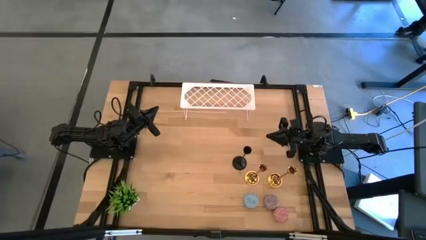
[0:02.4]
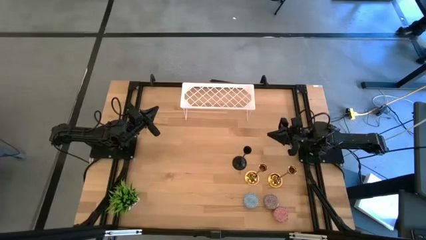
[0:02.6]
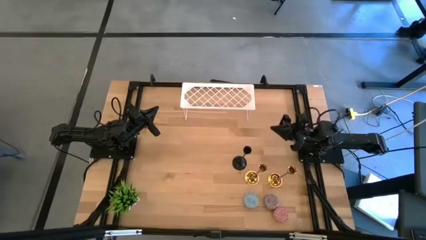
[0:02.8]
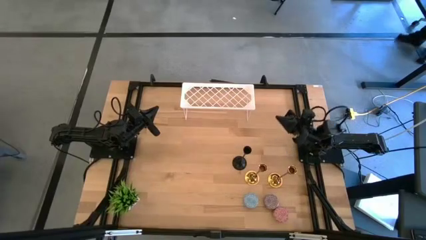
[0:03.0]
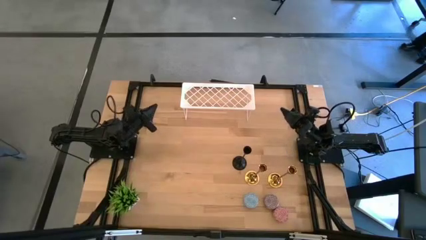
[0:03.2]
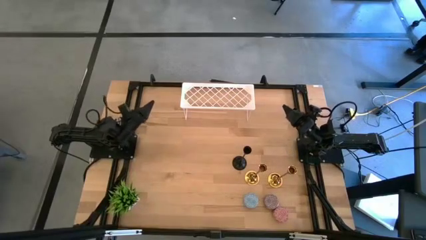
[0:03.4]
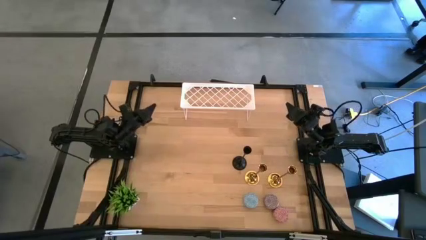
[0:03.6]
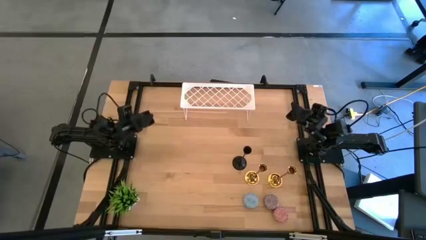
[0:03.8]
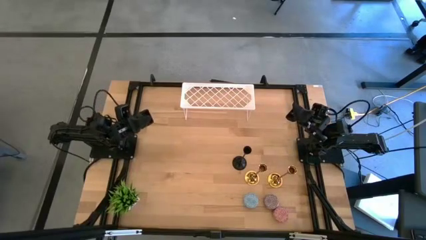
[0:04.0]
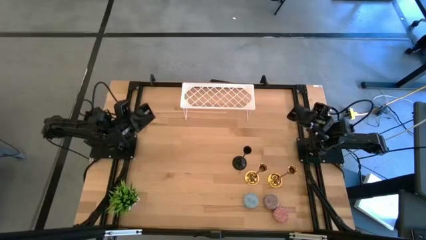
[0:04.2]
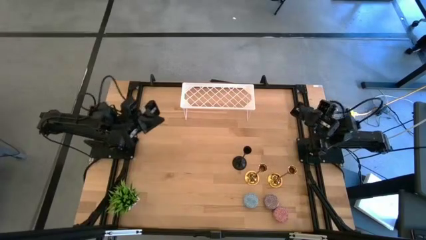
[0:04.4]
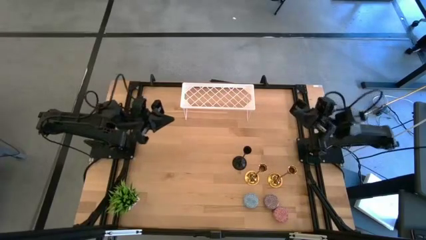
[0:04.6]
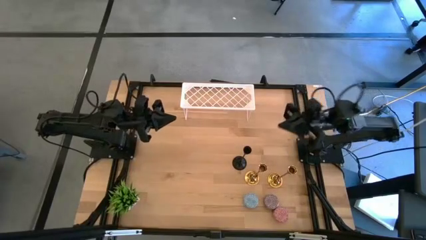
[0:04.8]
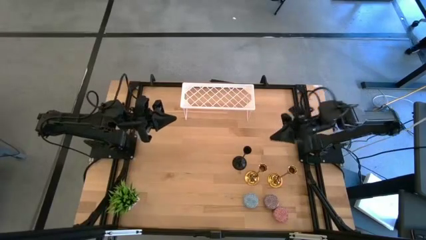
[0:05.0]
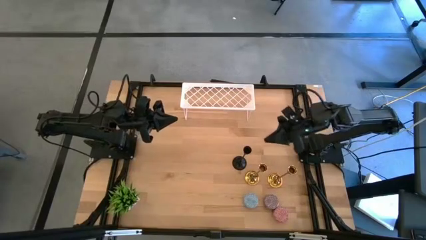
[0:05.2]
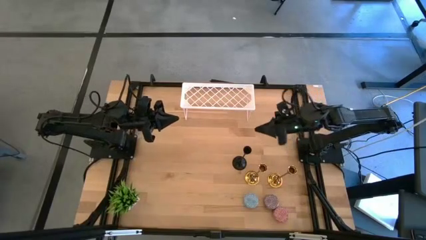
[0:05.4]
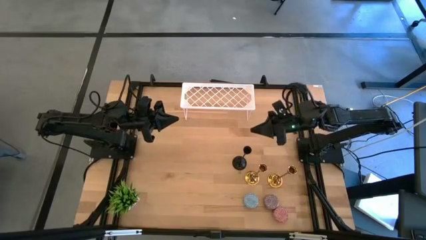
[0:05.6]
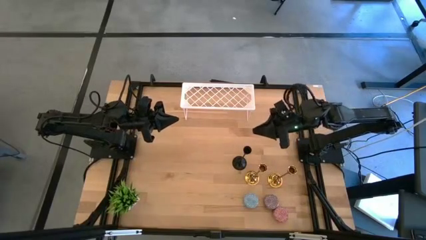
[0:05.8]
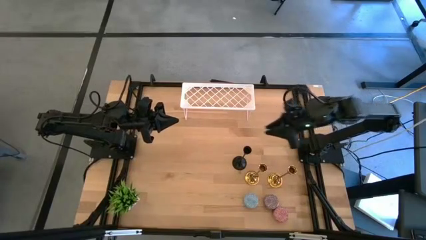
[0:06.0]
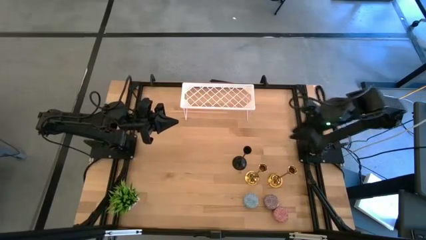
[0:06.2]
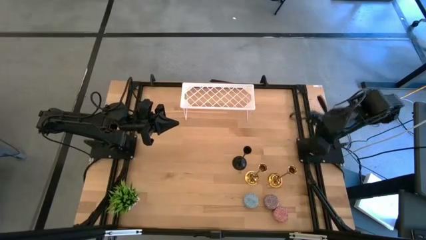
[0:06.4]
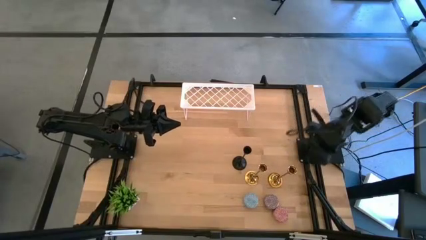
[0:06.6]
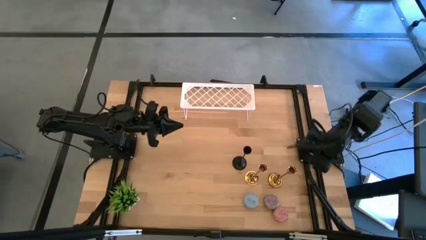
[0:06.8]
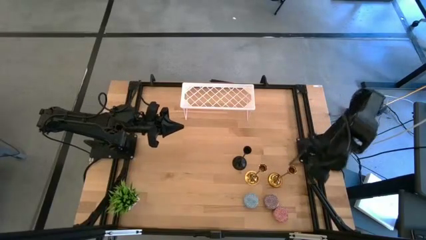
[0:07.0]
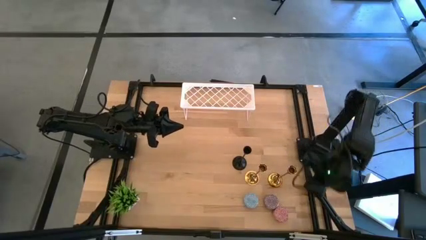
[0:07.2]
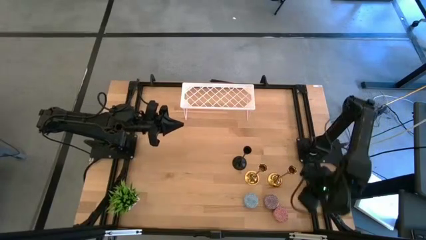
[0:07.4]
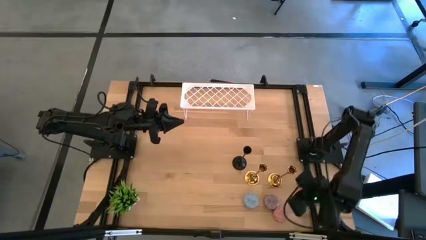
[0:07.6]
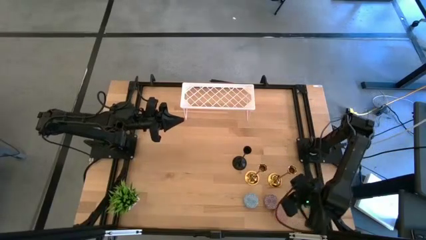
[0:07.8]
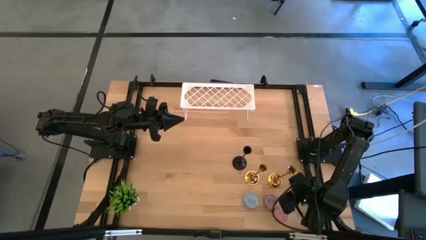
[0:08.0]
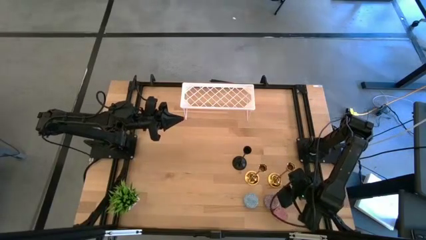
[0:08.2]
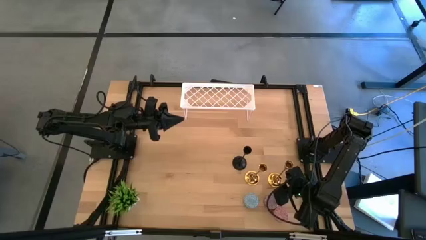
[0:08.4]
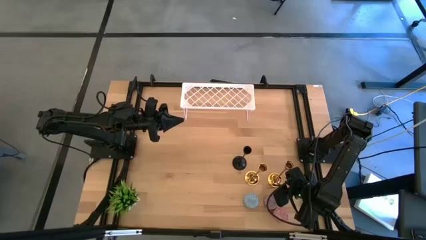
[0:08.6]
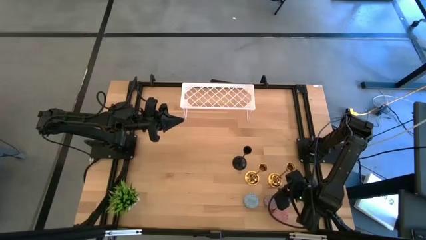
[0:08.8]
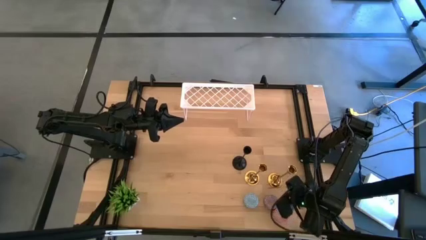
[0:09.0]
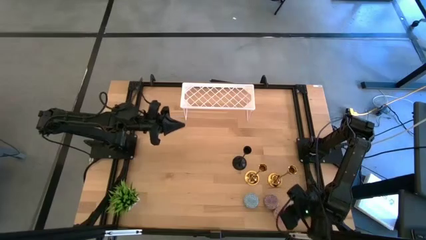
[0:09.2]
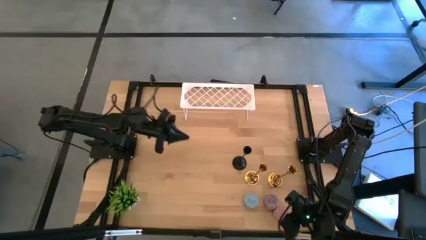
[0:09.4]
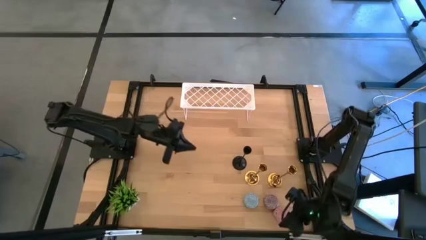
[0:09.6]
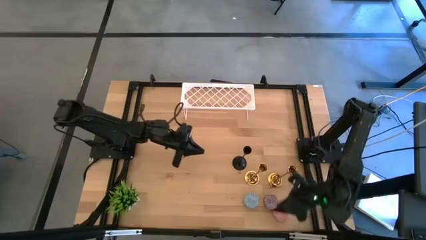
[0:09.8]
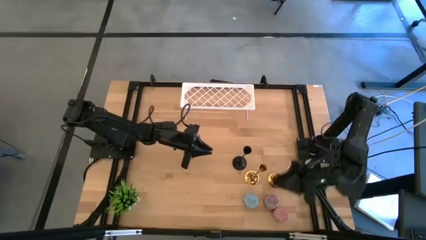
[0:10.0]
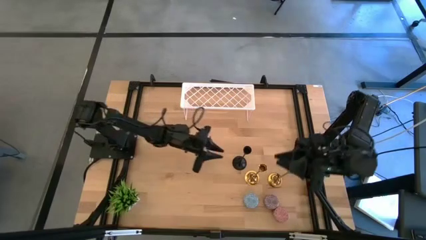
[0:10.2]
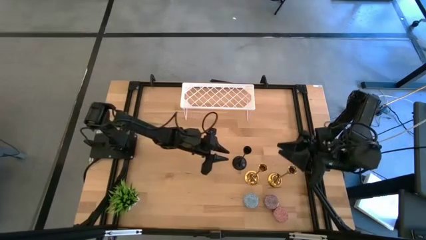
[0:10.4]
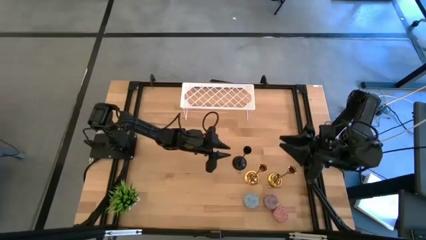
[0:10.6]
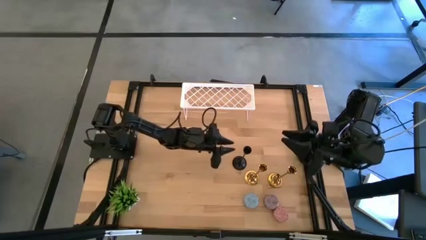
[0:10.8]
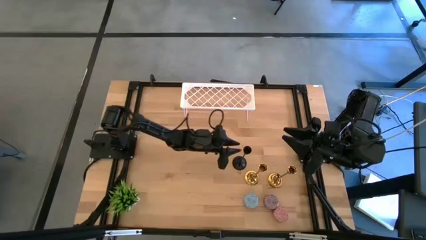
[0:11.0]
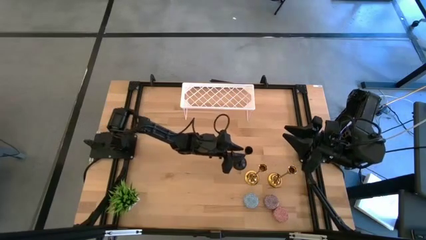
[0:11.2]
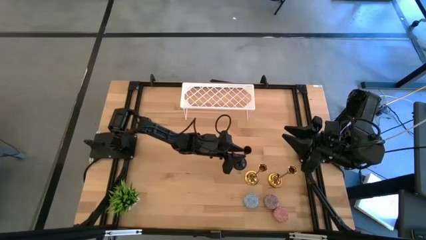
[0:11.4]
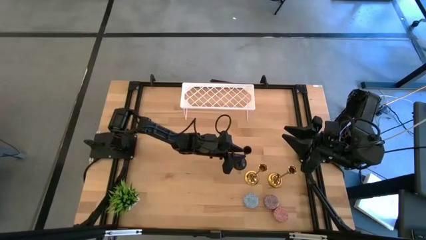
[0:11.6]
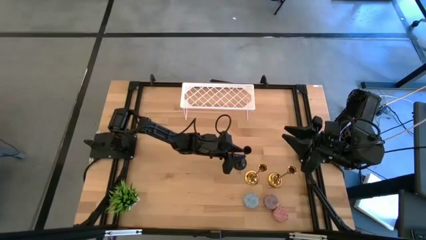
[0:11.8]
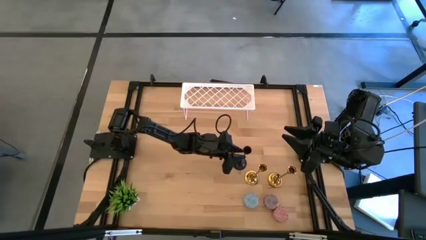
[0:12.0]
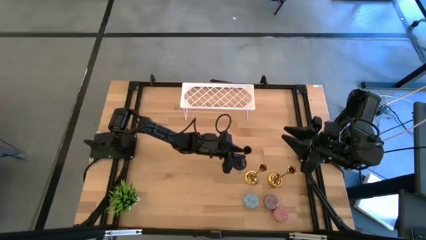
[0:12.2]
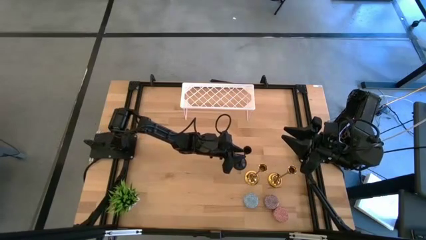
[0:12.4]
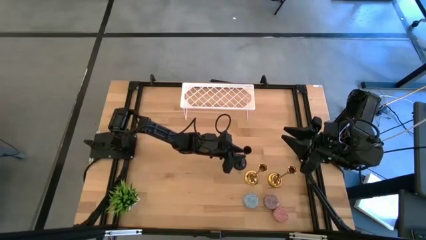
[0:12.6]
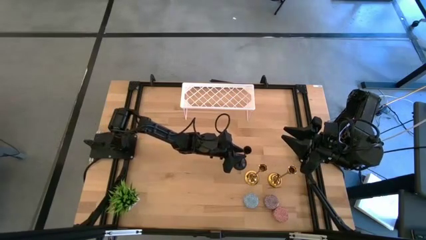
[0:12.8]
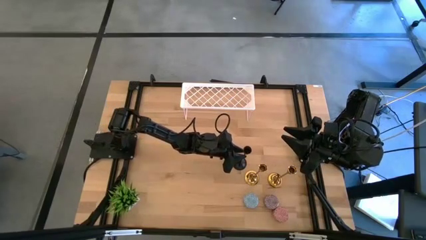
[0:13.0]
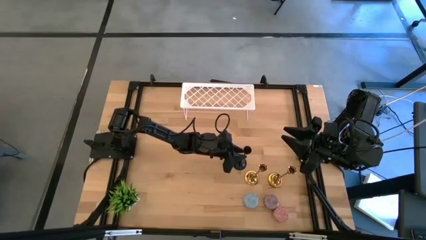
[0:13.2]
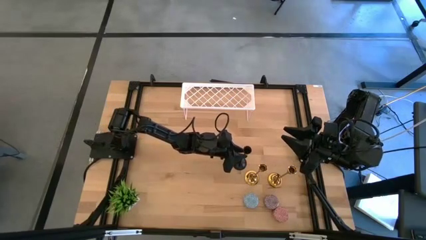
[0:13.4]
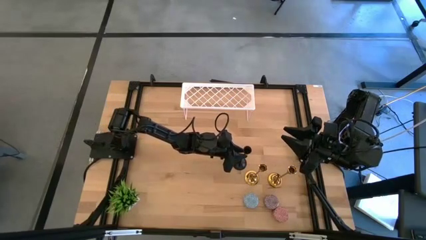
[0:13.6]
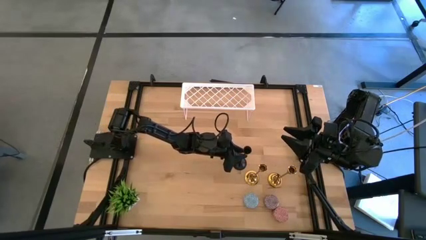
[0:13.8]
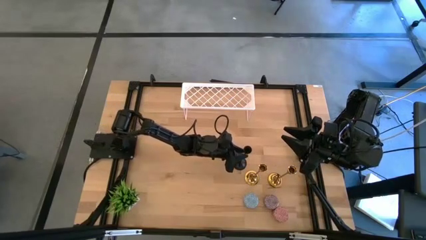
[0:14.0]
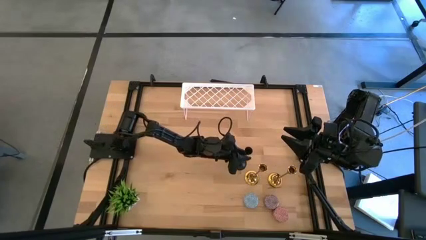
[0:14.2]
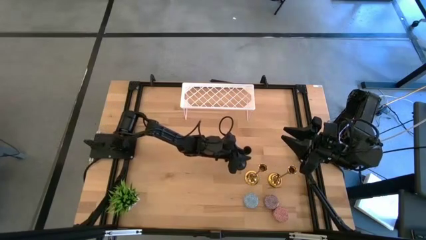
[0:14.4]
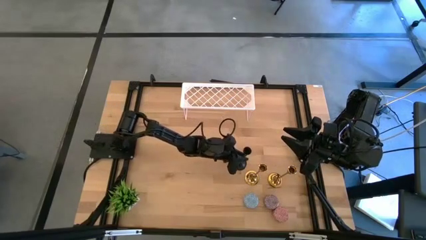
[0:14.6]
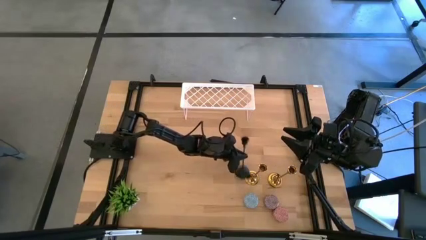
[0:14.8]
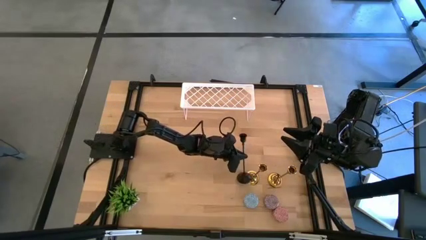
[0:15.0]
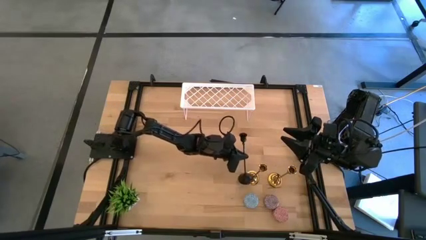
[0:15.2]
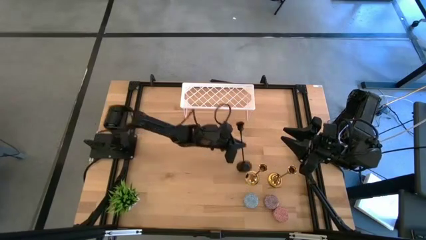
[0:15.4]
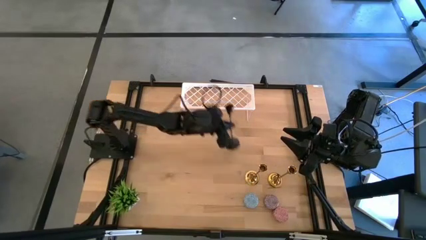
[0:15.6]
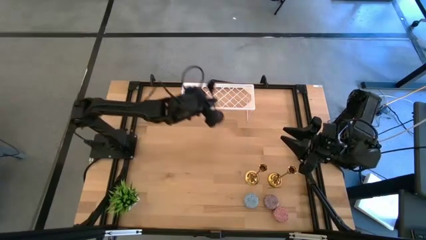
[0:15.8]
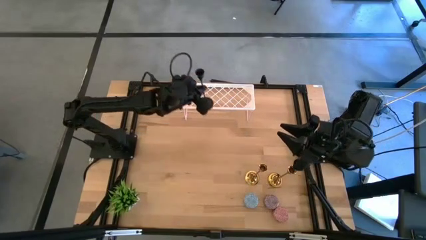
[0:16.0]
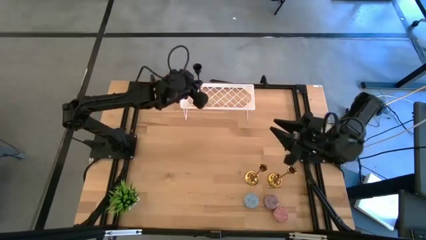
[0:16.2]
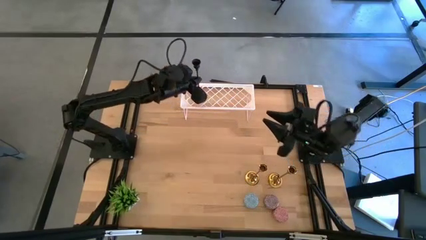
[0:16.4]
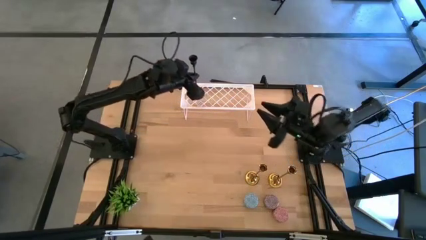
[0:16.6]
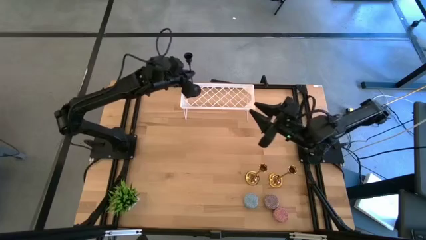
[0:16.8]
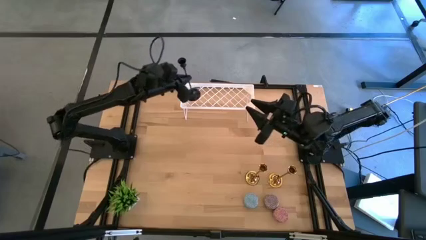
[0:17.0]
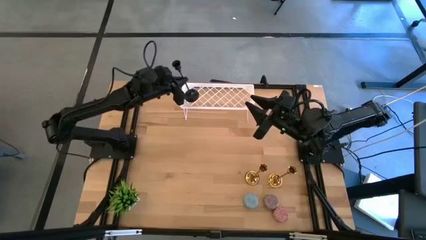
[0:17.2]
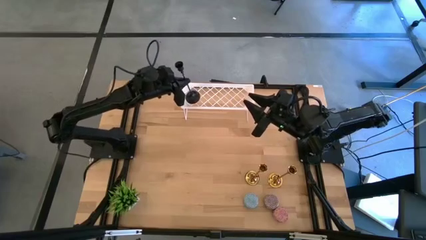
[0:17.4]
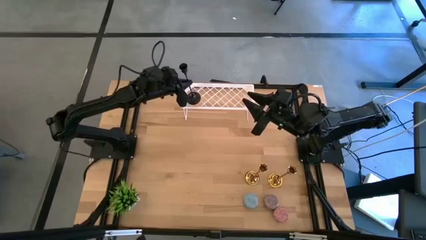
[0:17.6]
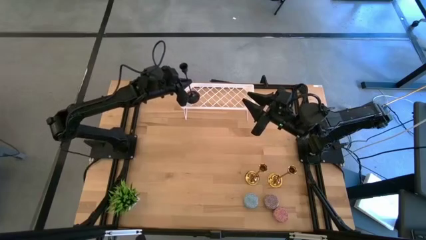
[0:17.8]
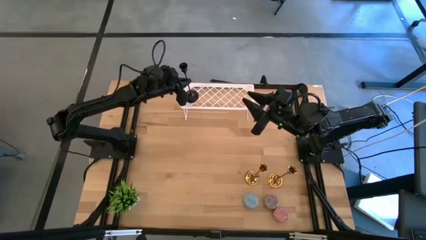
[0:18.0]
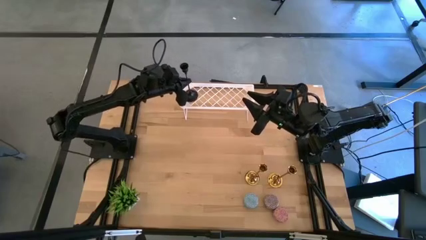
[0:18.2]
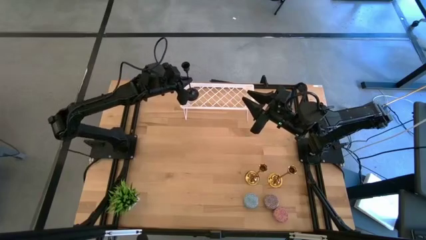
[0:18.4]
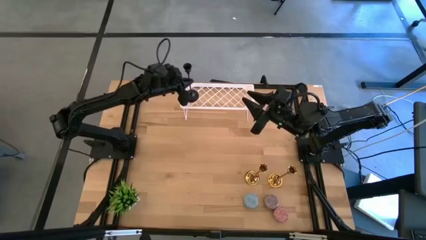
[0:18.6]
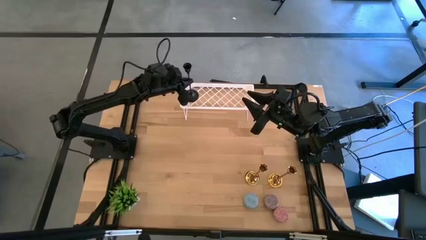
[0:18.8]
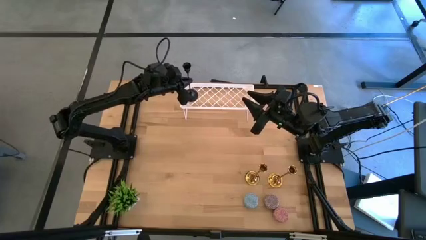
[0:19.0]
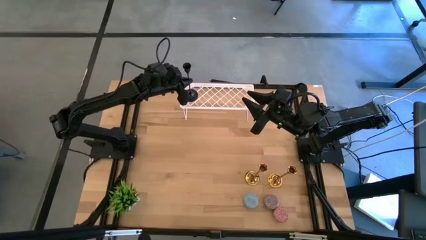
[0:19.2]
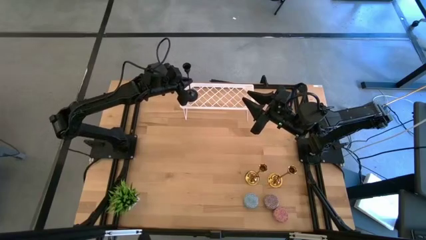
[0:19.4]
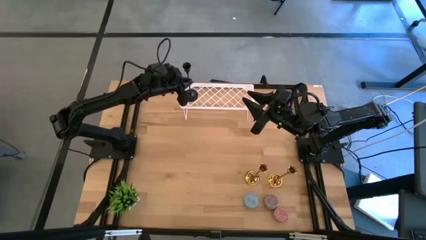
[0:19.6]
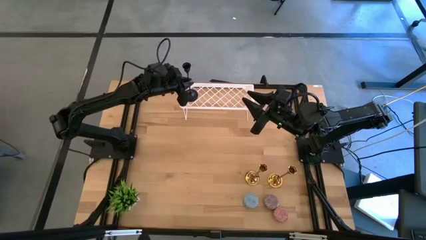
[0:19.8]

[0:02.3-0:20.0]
Task: Pick & Place candle stick holders
Put the black candle holder on the shelf
